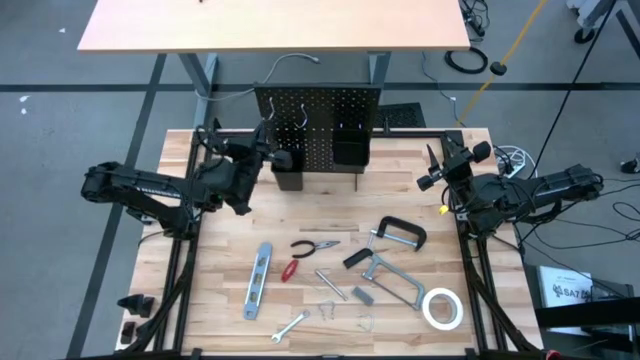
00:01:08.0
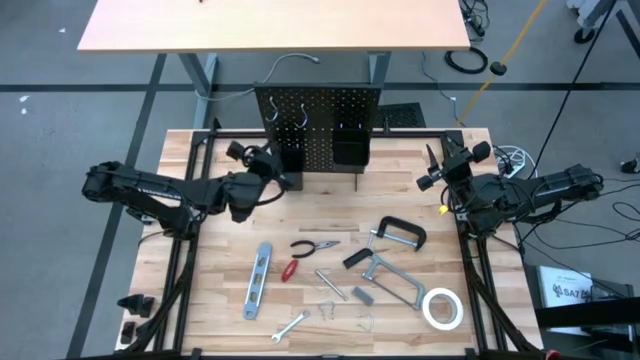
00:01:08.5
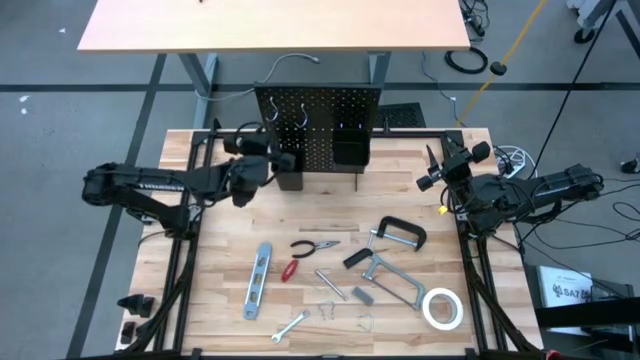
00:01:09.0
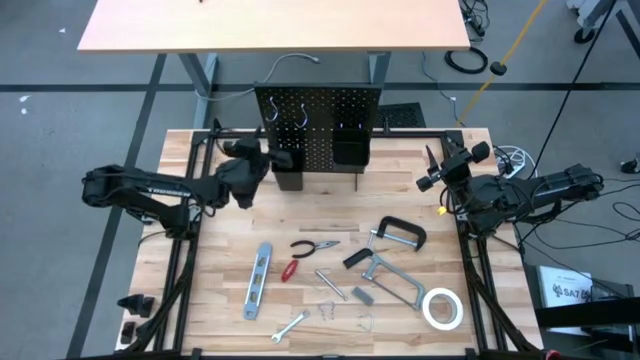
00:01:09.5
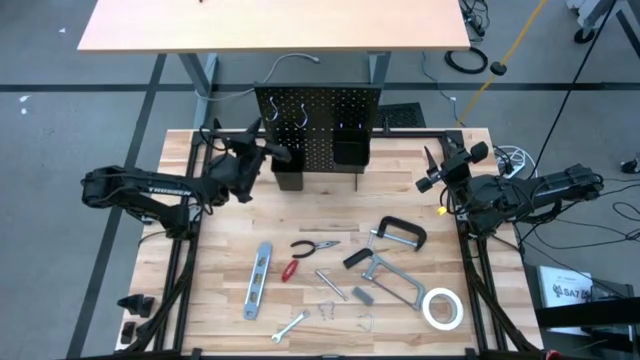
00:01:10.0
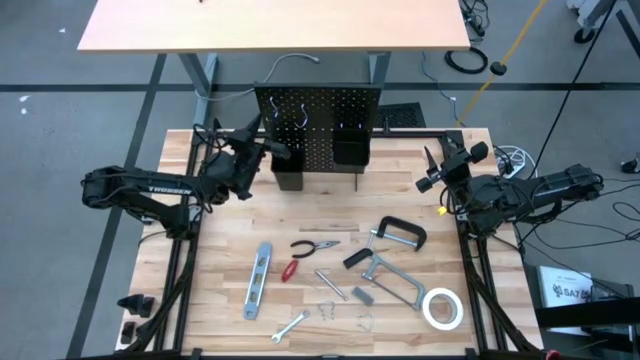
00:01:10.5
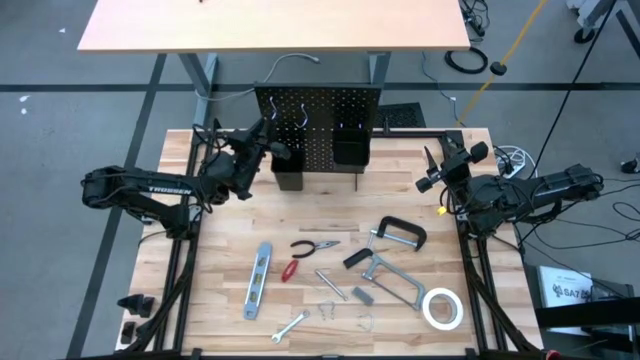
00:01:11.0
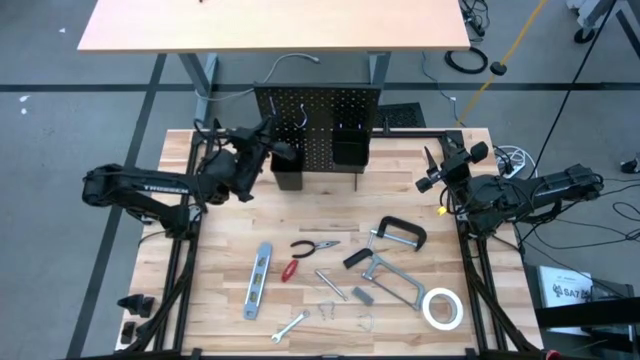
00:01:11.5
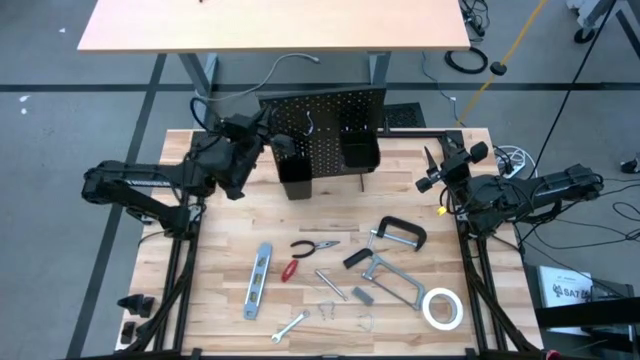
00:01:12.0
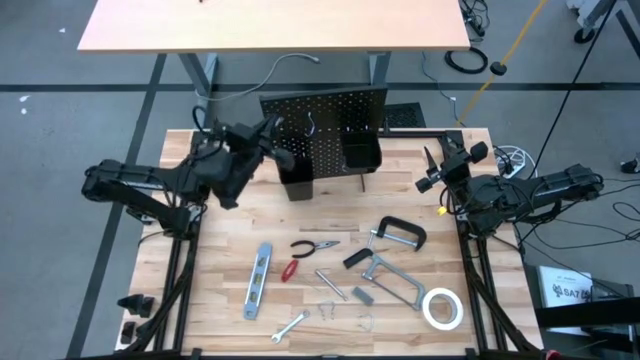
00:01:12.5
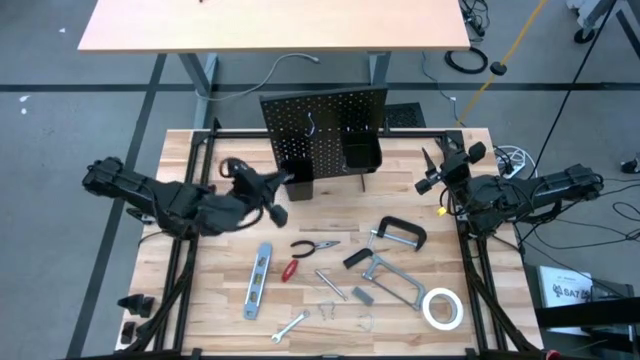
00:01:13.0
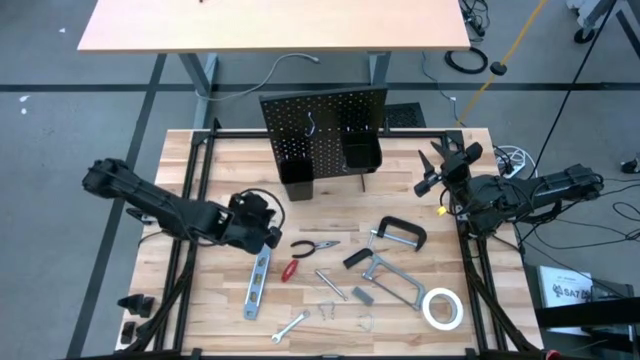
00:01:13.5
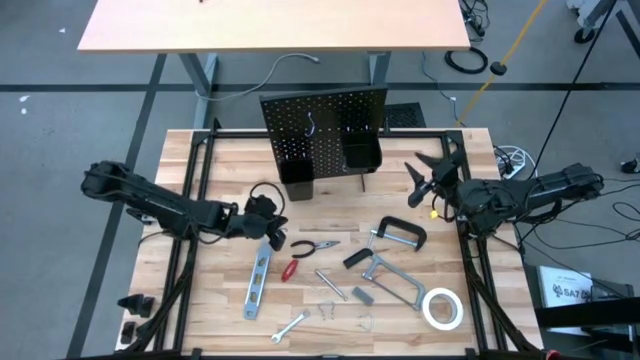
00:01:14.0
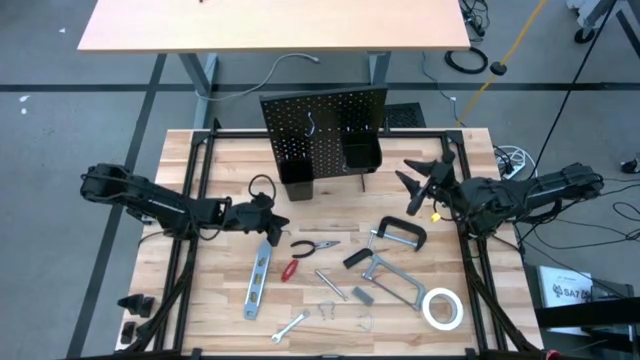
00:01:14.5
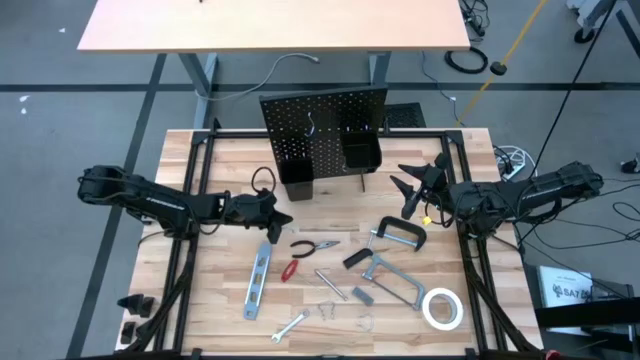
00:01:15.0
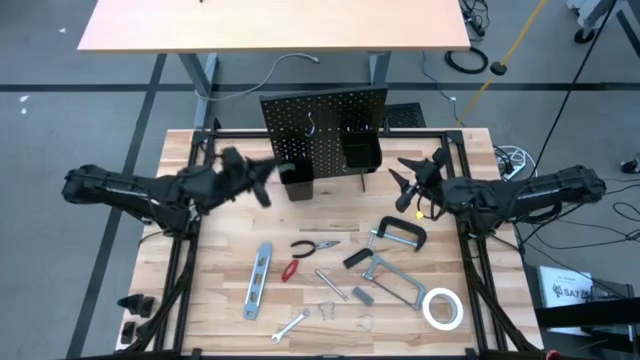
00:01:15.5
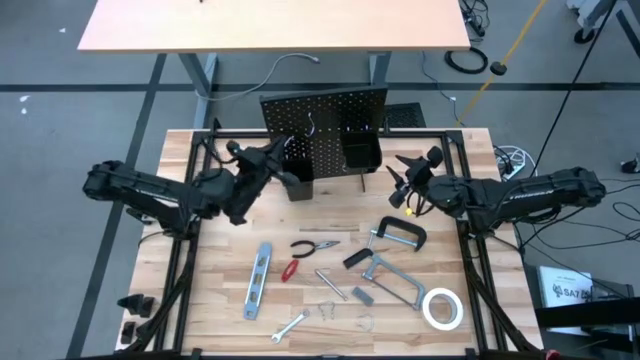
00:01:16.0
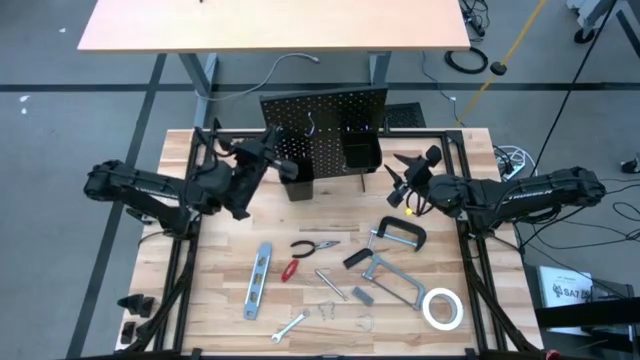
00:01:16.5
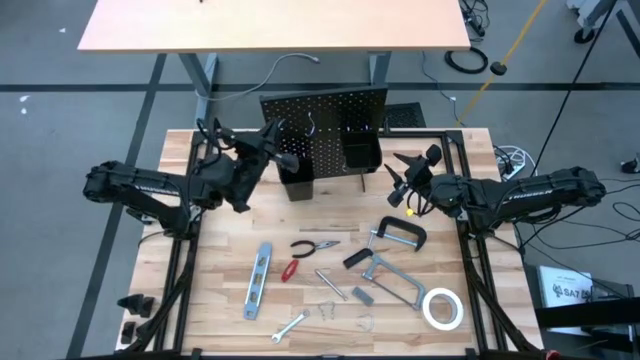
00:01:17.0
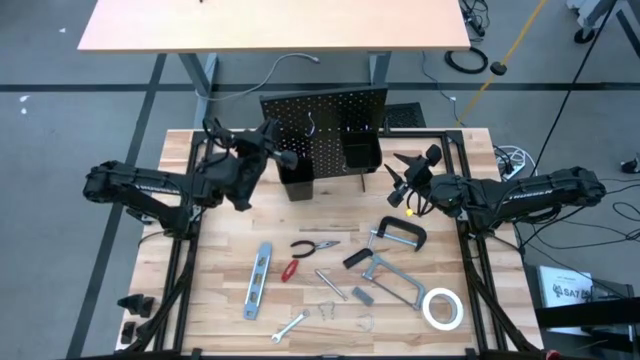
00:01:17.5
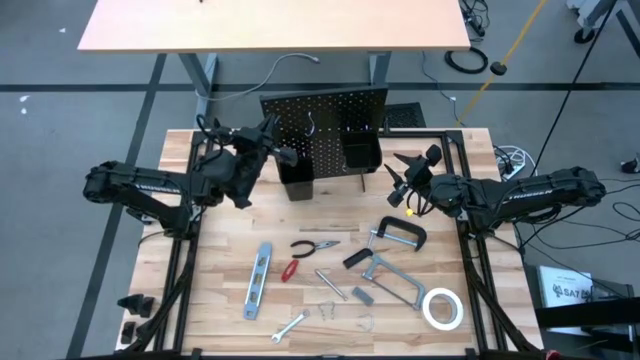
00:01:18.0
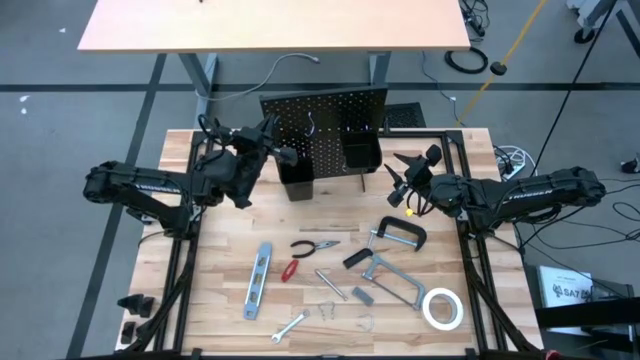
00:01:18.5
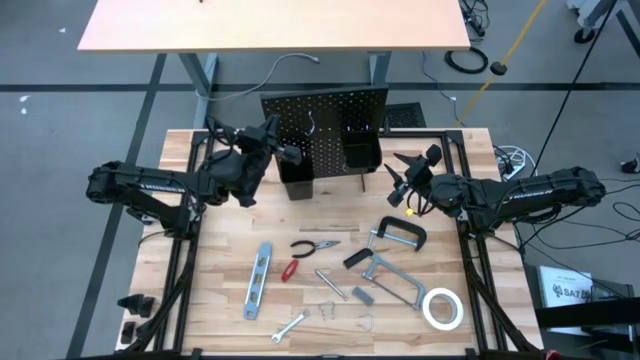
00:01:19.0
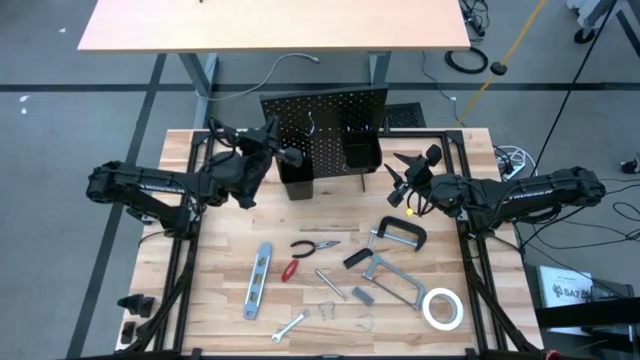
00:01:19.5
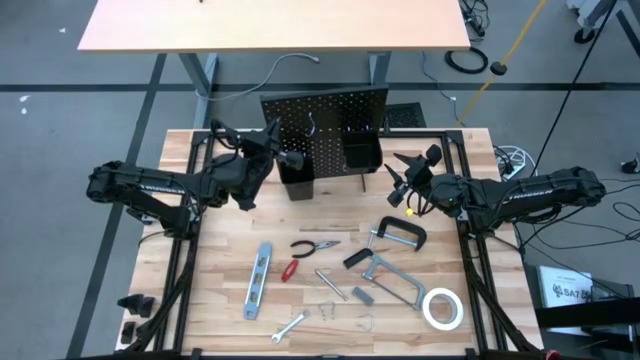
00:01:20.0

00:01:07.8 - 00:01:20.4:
Task: Hang tools onto peg board
Insert the left silver hanger hook on the pegboard

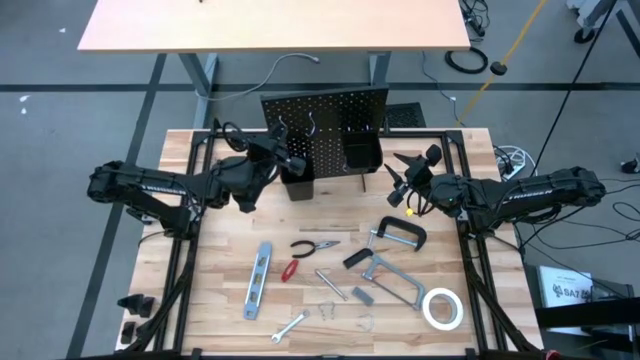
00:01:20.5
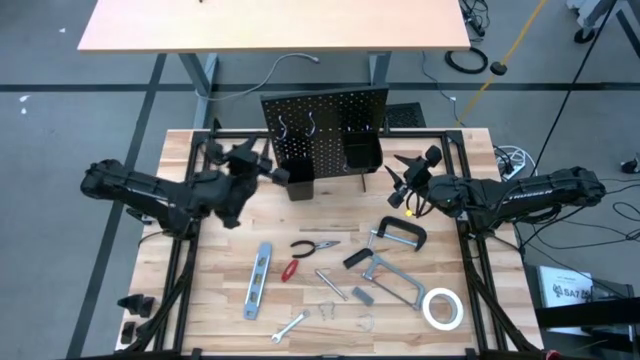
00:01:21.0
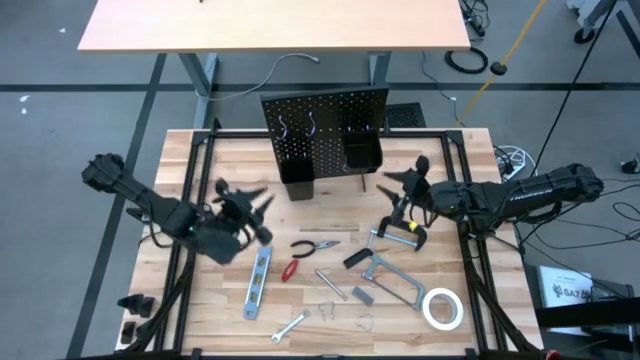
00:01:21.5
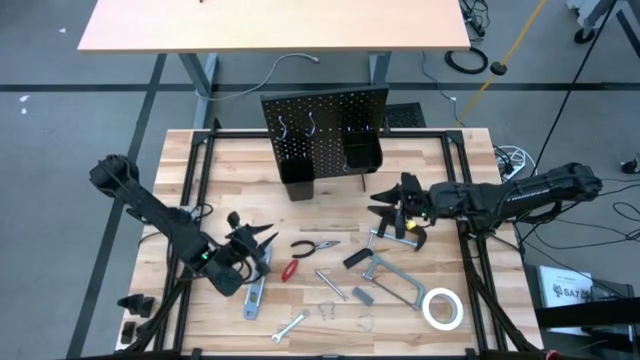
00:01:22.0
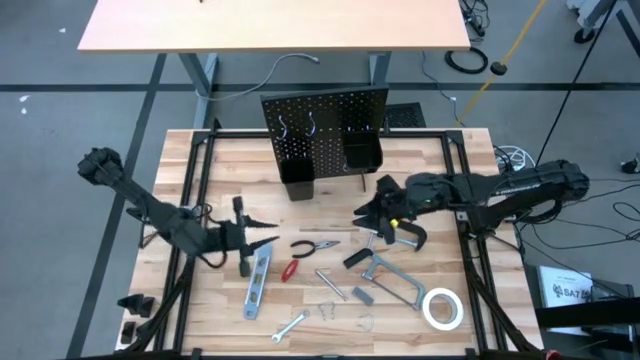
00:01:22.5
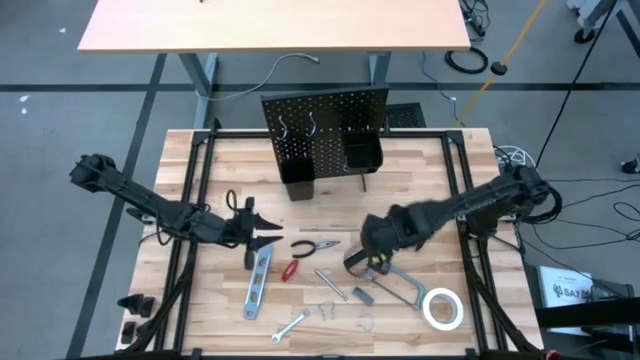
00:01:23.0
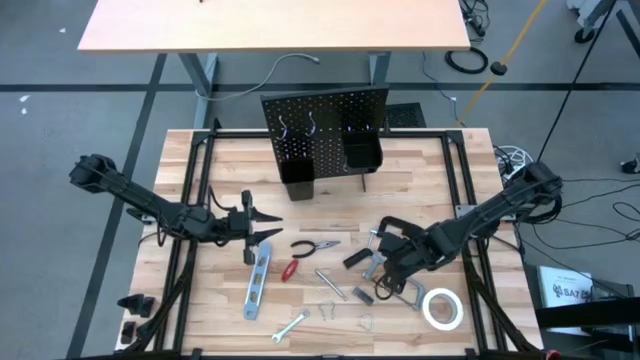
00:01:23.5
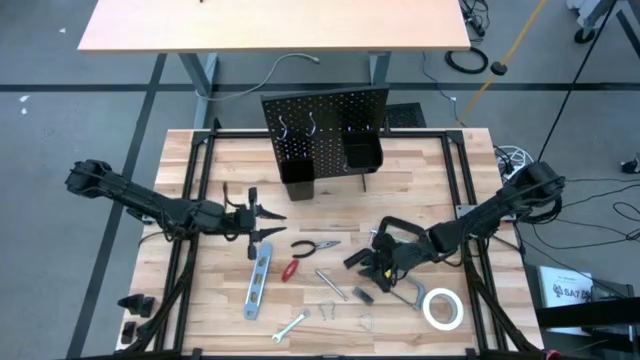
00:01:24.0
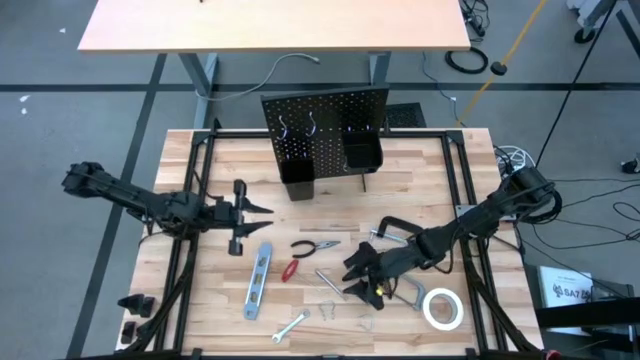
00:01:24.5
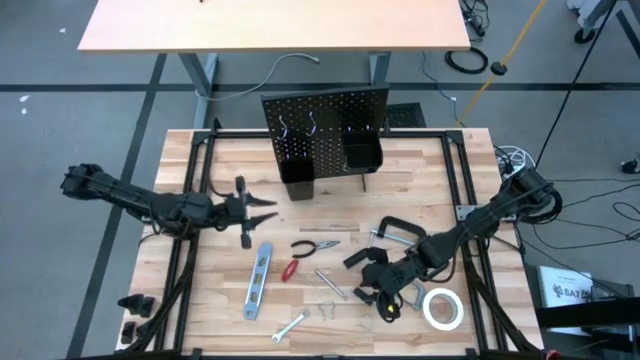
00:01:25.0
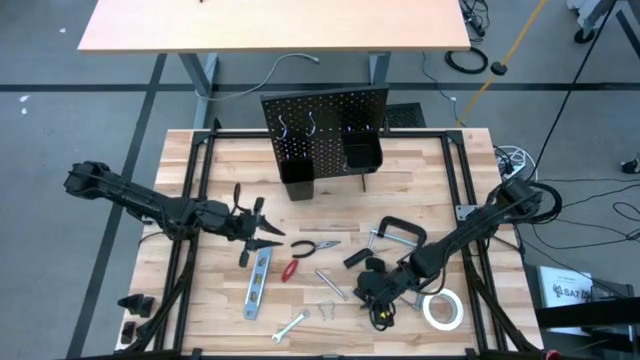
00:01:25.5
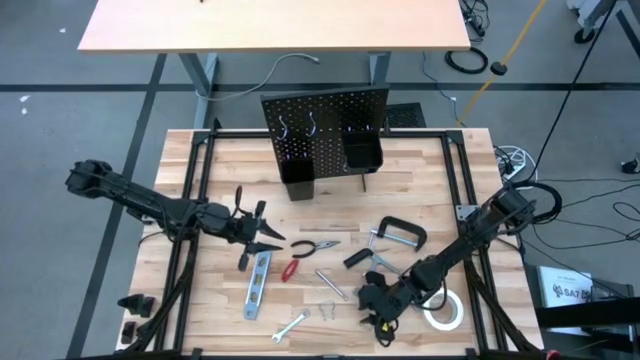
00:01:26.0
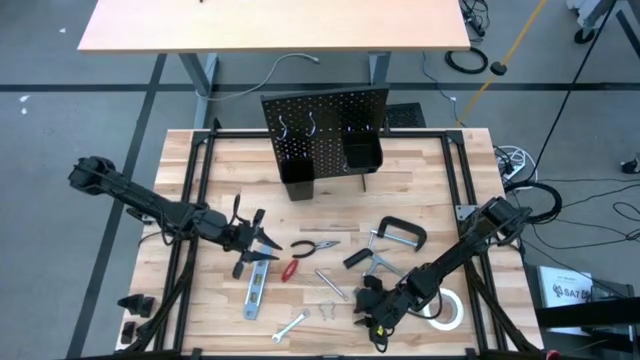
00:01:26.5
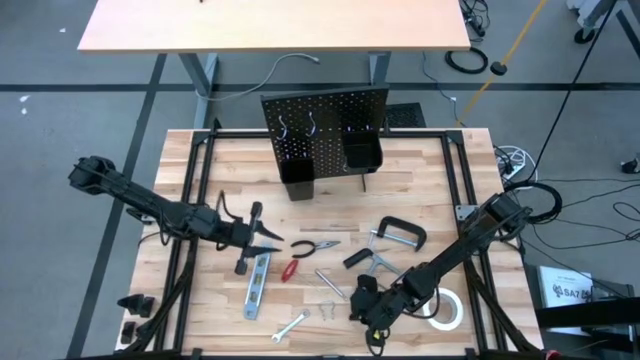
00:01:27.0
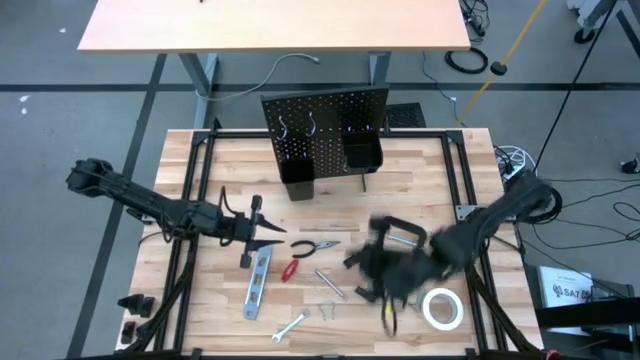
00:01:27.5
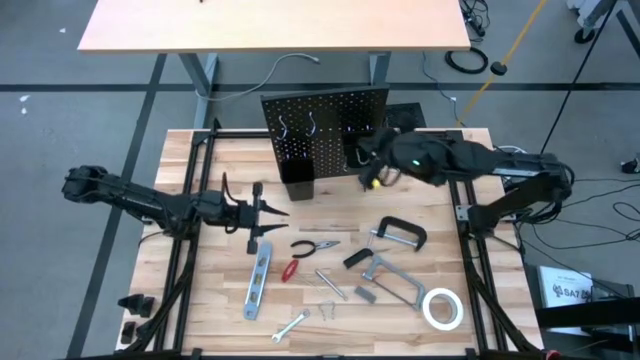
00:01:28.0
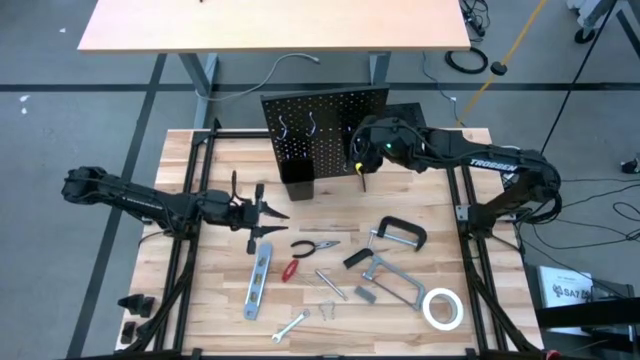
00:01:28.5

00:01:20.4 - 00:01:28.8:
Put the right binder clip into the right black bin on the pegboard
